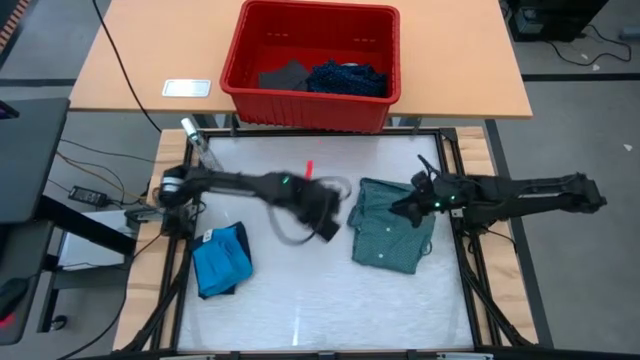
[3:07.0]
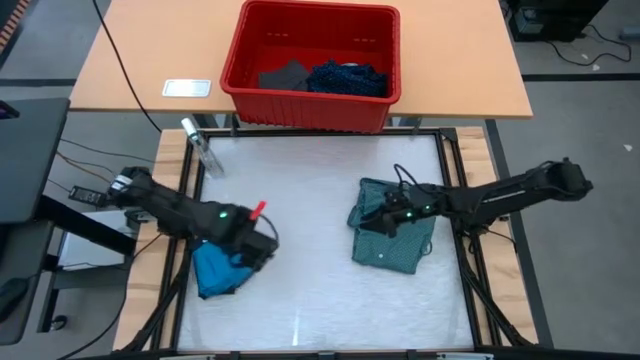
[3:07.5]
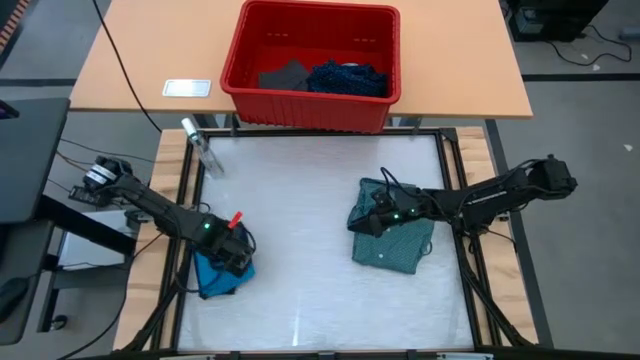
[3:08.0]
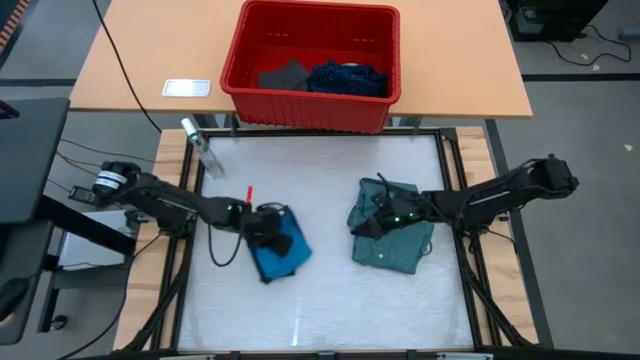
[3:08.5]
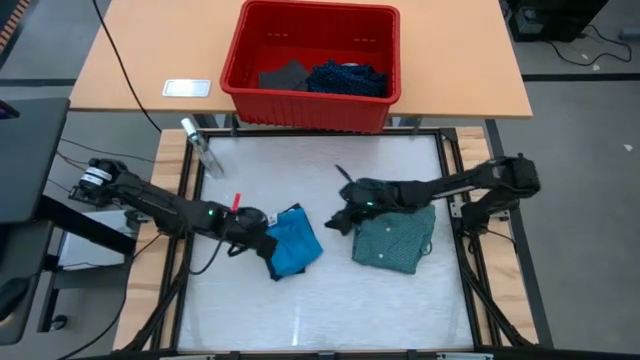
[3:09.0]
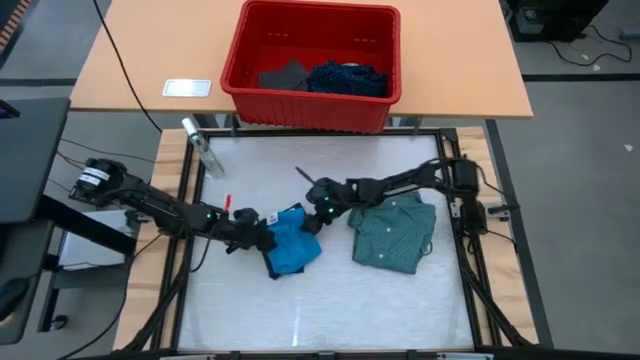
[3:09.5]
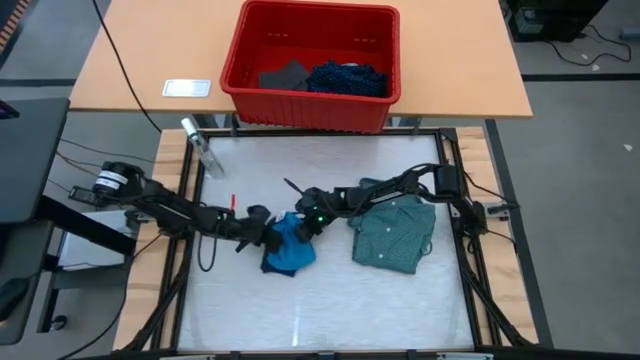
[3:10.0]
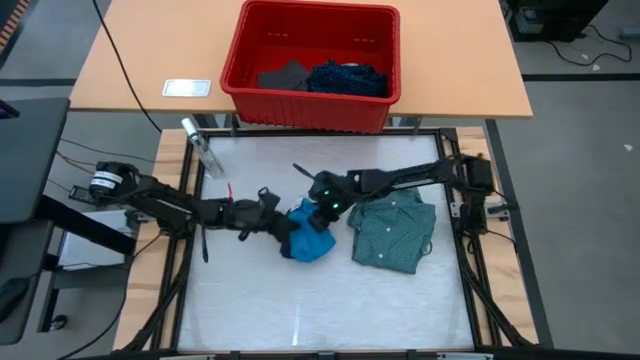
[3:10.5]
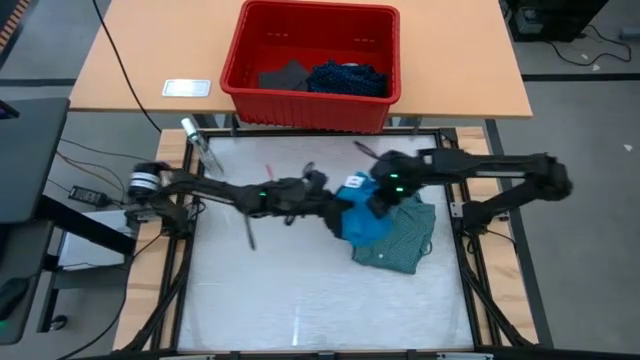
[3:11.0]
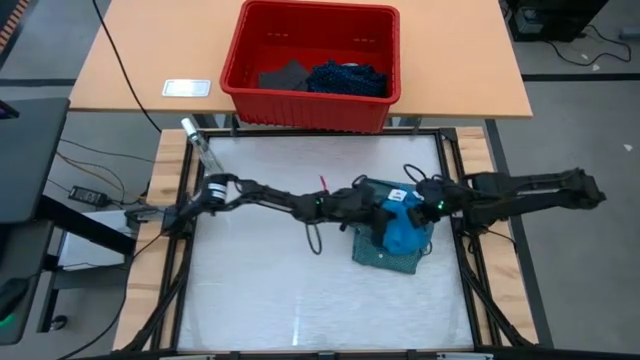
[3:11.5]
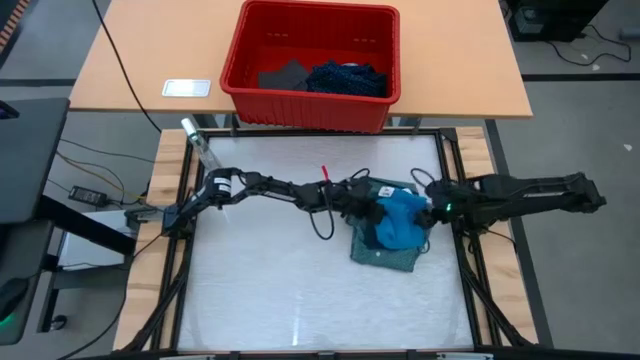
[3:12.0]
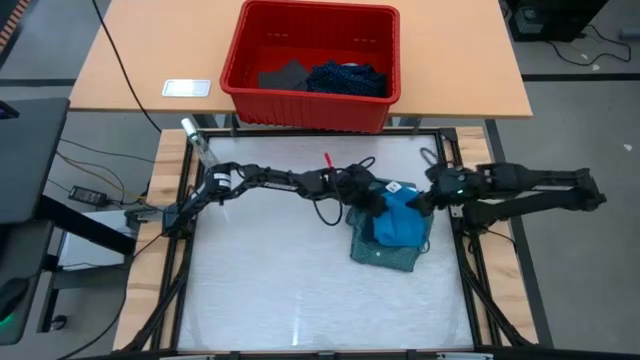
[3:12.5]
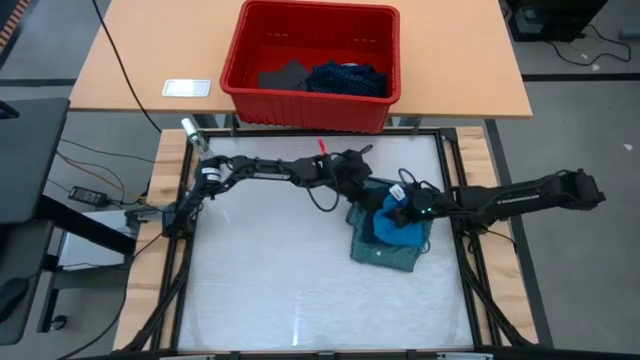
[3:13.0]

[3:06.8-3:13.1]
Task: Fold laundry
Stack the dark and light blue shorts on top of the green polo shirt

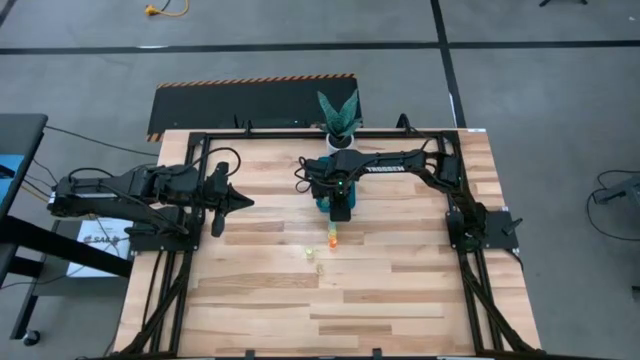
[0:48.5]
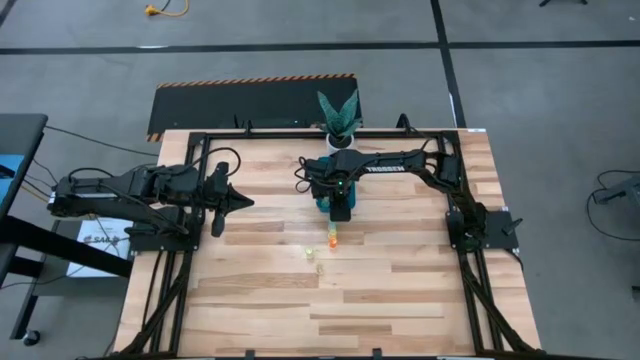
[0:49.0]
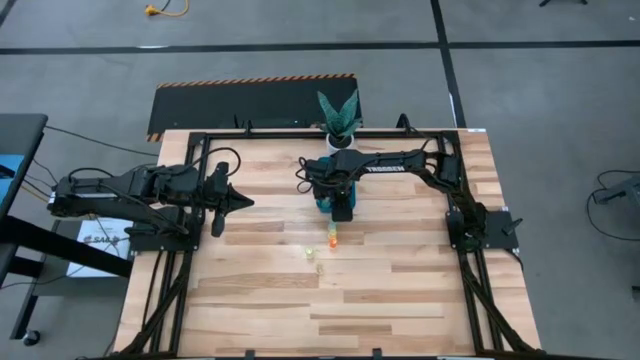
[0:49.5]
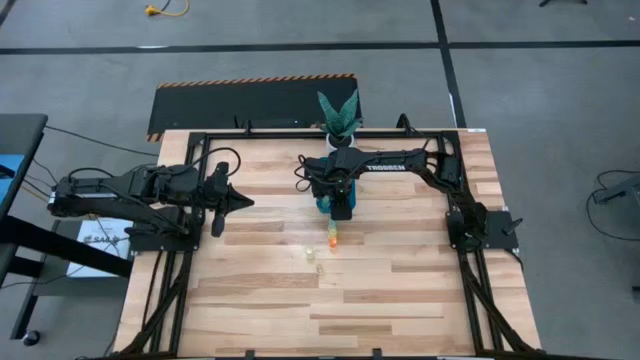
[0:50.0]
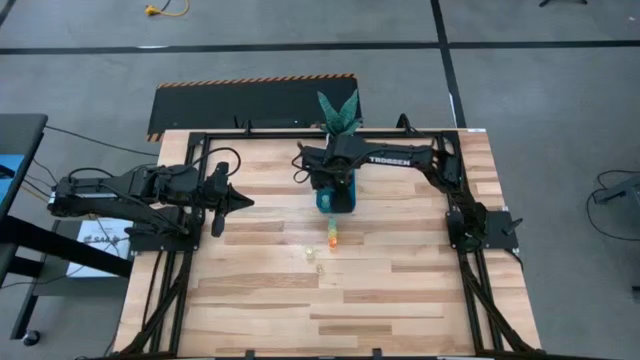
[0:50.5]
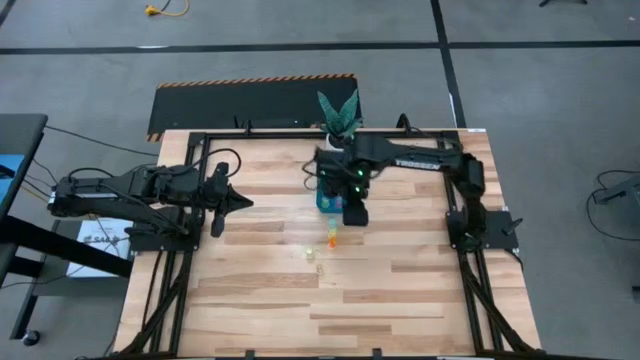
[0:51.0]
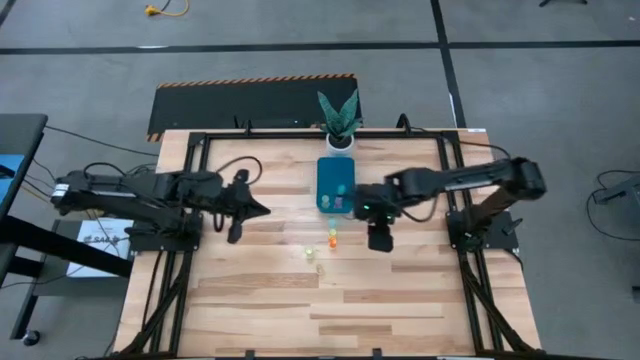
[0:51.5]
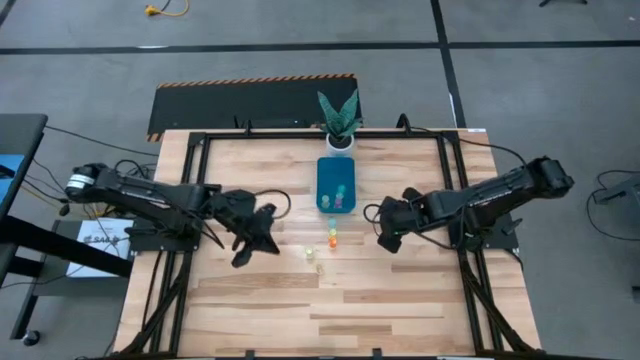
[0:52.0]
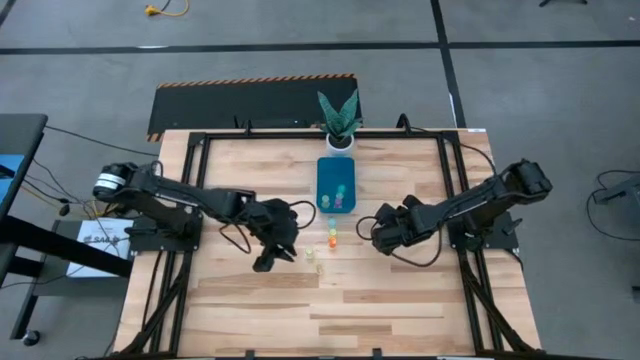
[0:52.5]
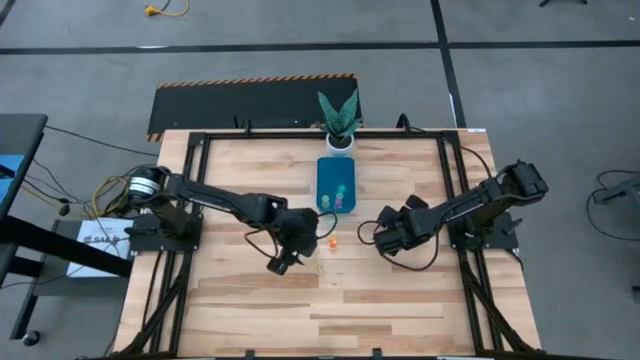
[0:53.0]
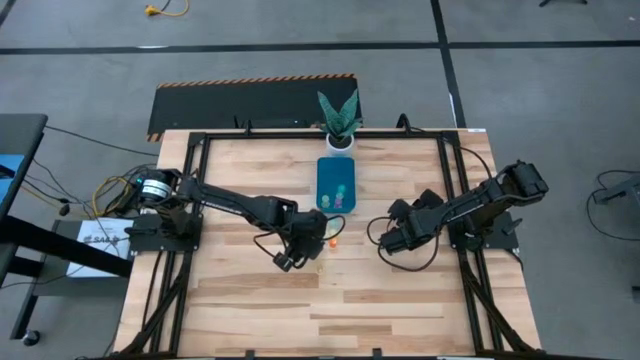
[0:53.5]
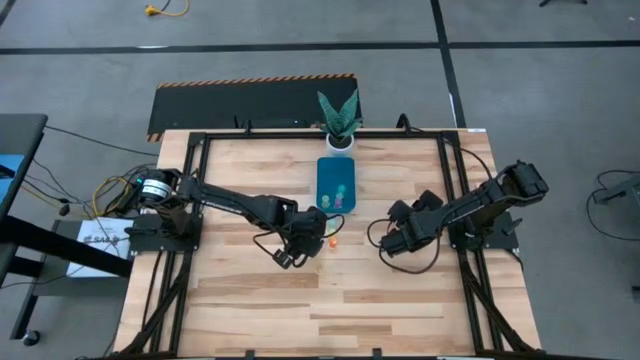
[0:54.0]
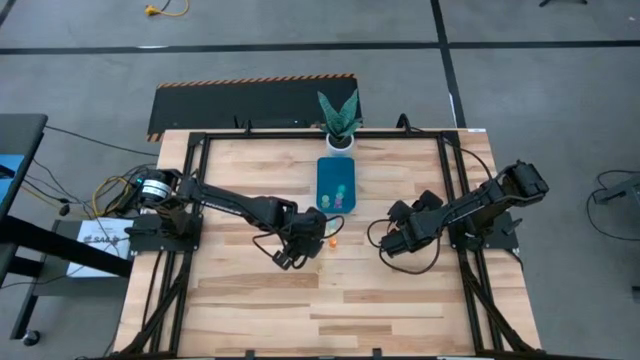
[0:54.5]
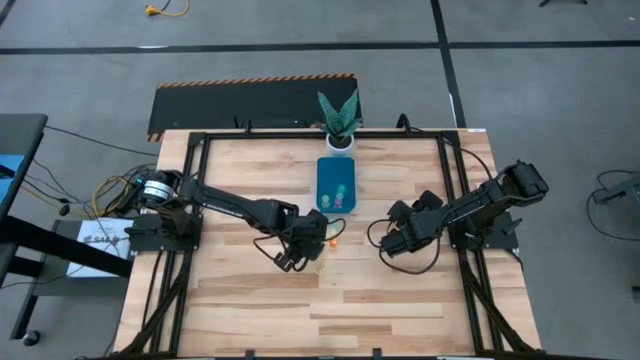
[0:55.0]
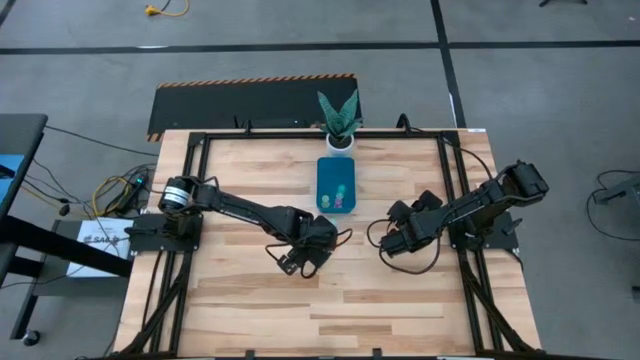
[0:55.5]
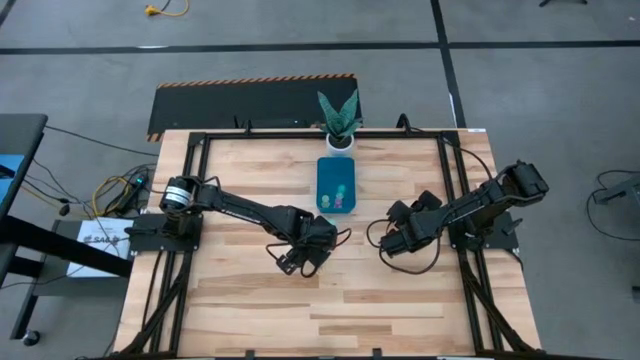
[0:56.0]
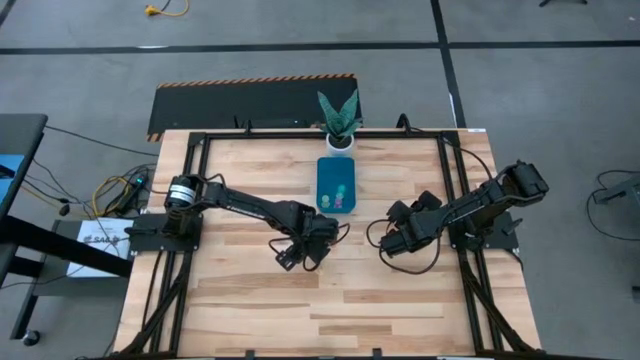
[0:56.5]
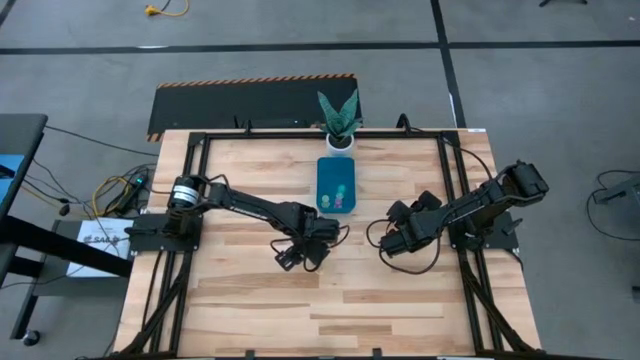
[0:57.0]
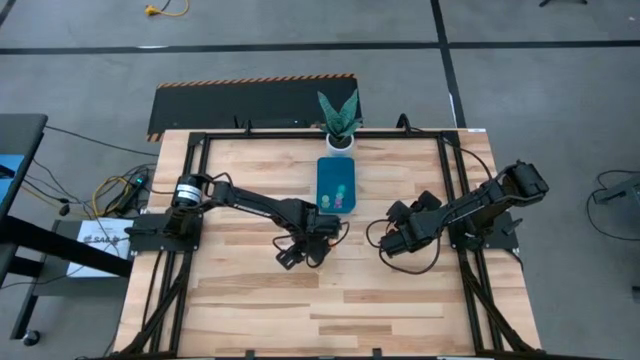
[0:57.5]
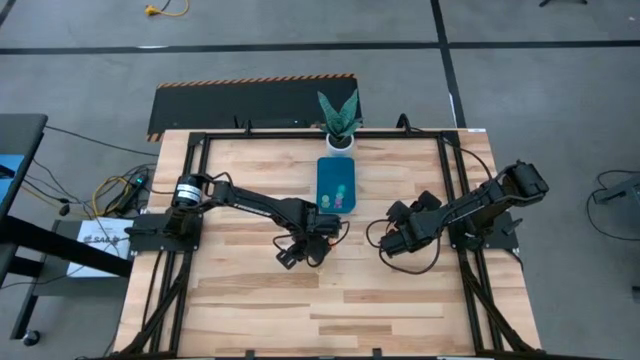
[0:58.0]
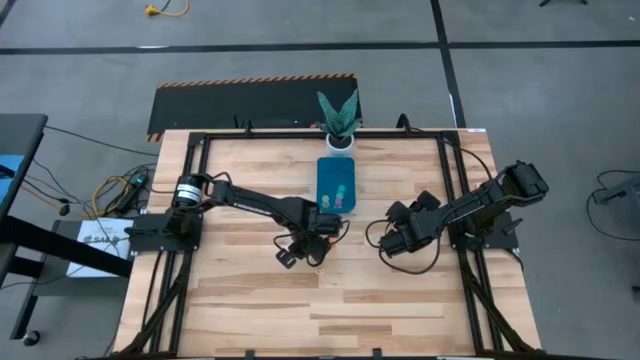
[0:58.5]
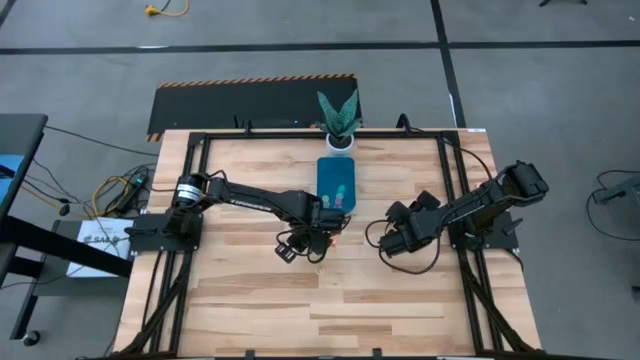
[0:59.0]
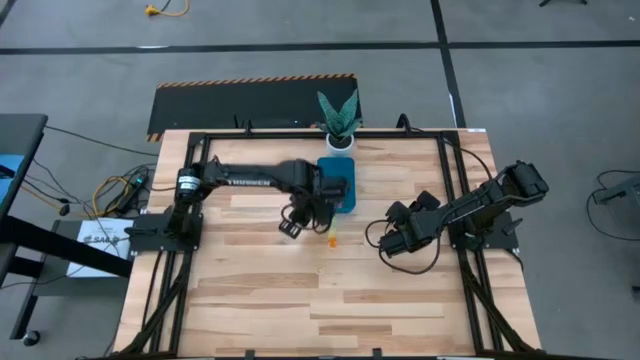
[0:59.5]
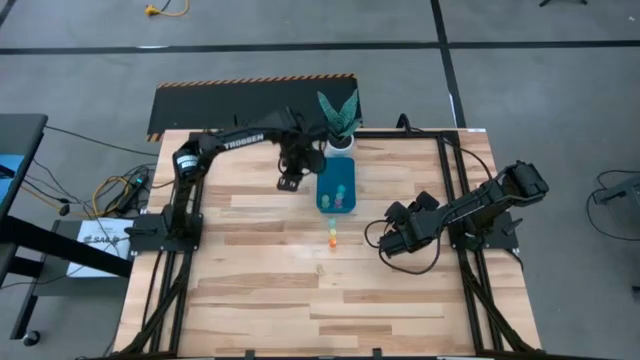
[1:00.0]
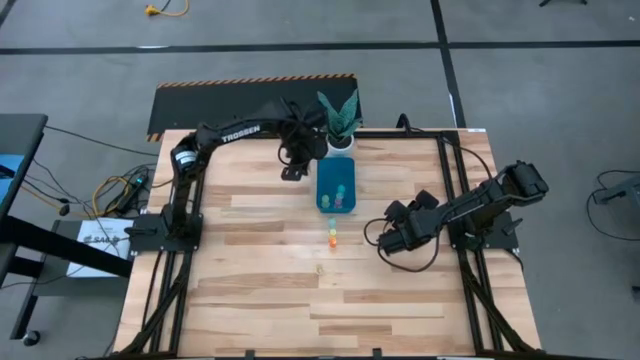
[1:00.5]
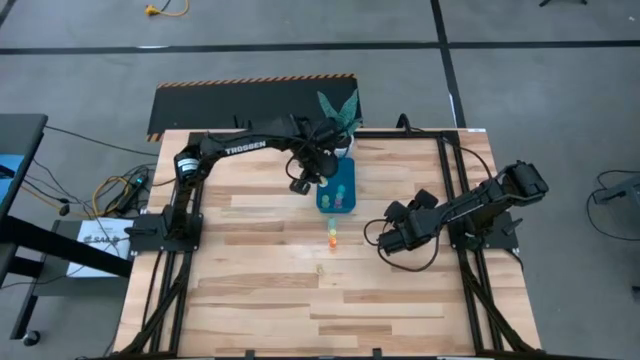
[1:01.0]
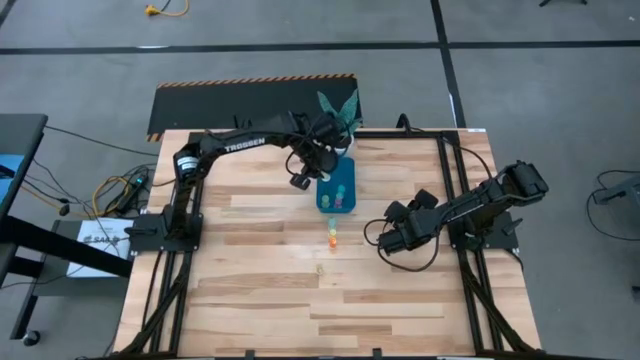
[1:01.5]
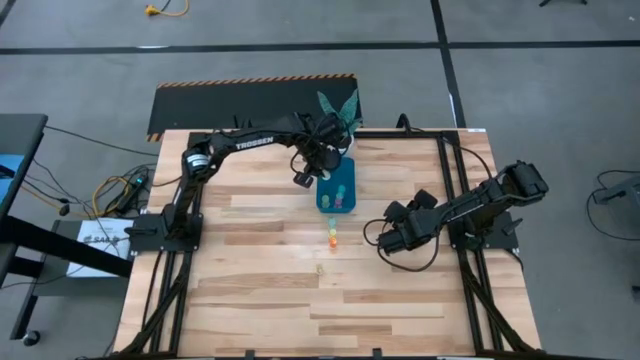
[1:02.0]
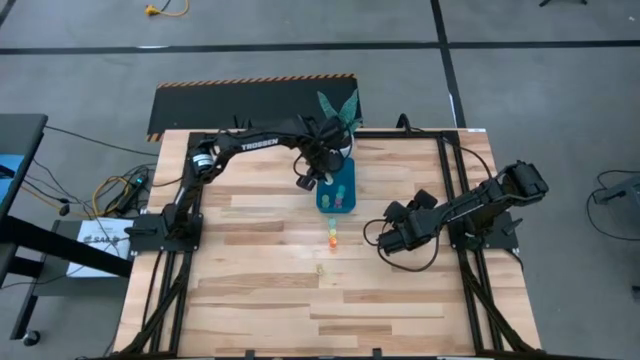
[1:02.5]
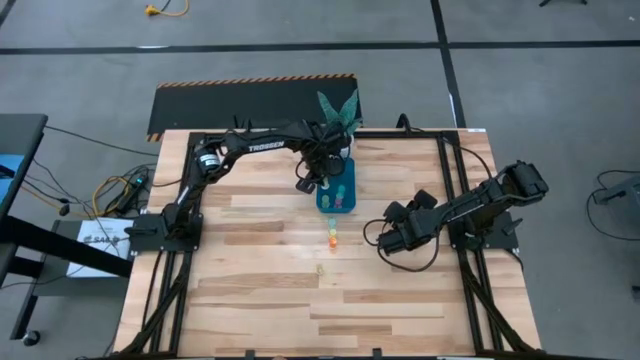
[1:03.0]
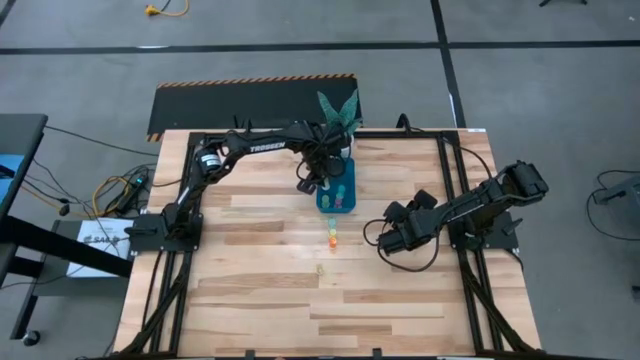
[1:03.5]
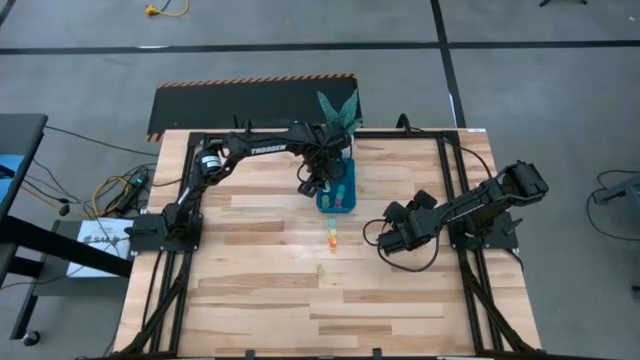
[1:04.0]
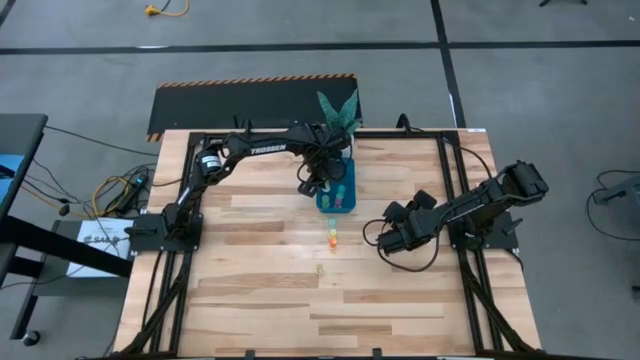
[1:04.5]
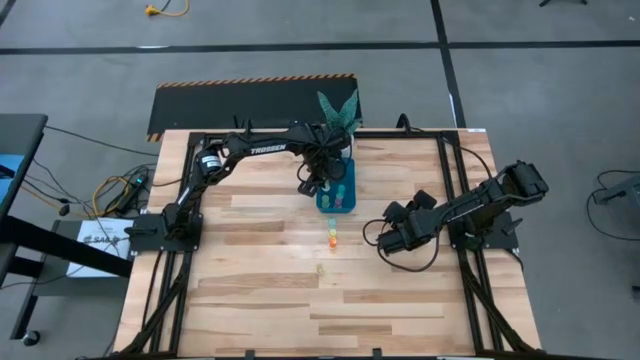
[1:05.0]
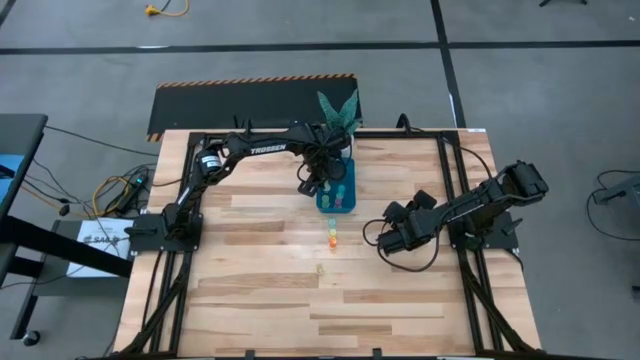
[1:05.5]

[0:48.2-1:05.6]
Task: Pick and place pill bottles into a basket
Put the yellow pill bottle into the blue bin
